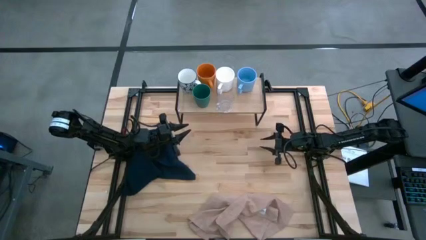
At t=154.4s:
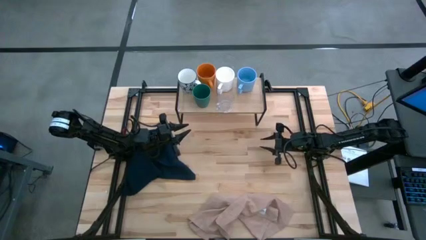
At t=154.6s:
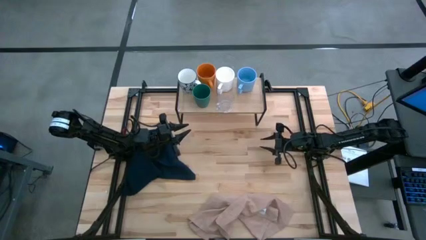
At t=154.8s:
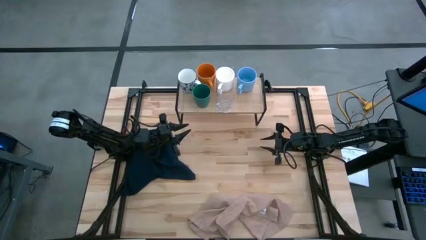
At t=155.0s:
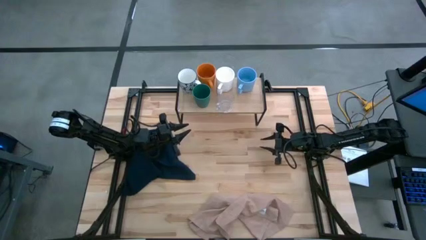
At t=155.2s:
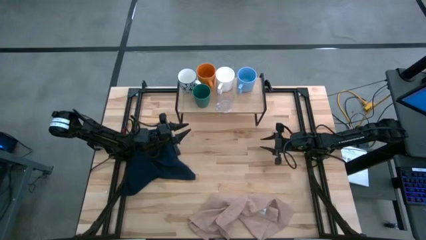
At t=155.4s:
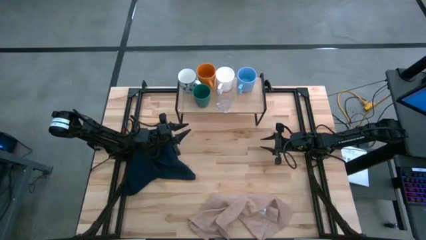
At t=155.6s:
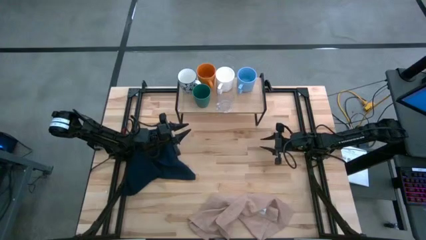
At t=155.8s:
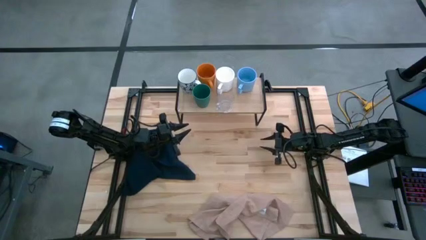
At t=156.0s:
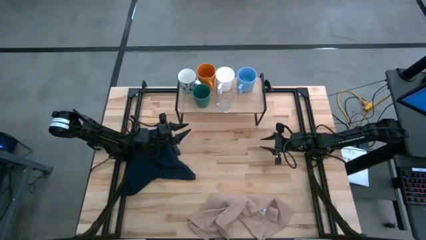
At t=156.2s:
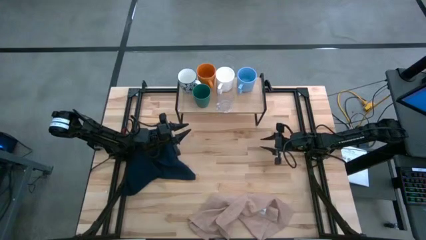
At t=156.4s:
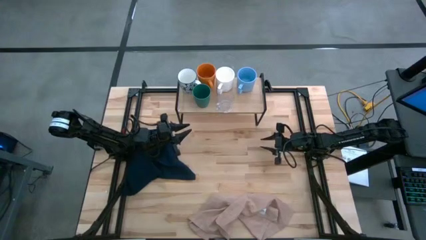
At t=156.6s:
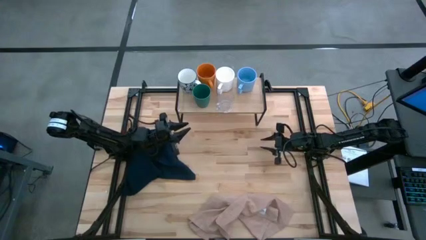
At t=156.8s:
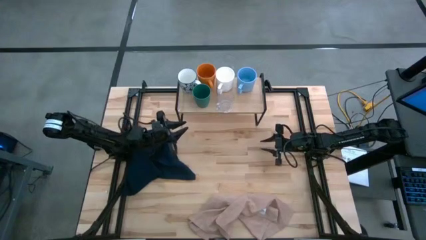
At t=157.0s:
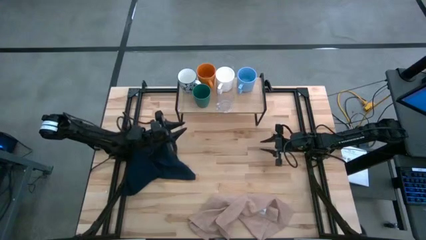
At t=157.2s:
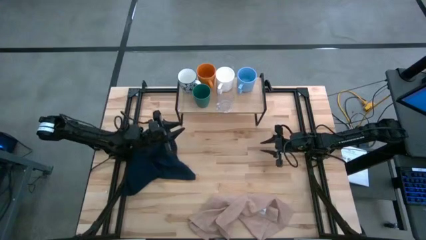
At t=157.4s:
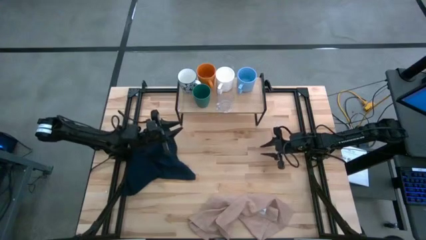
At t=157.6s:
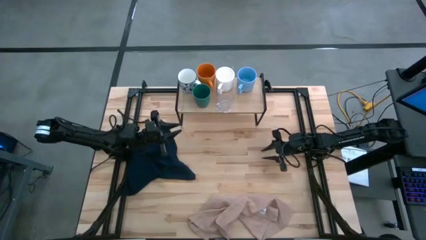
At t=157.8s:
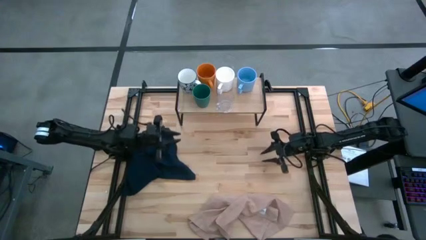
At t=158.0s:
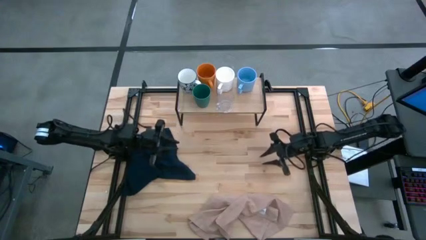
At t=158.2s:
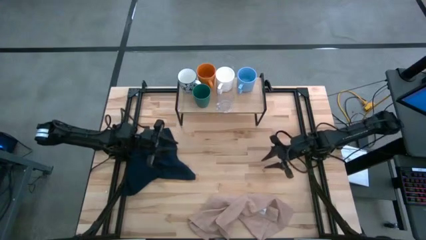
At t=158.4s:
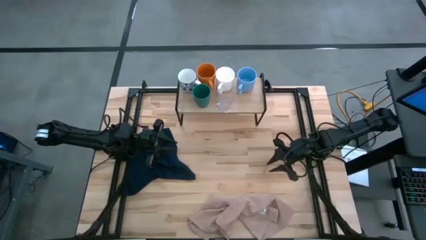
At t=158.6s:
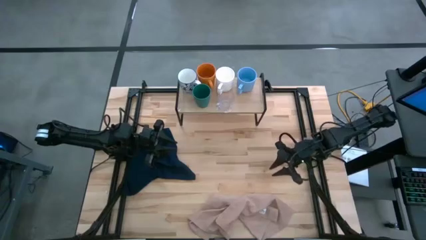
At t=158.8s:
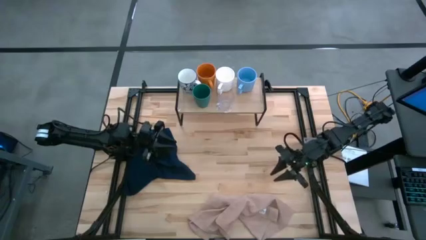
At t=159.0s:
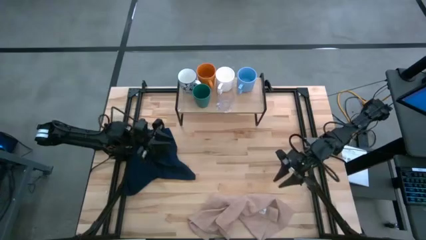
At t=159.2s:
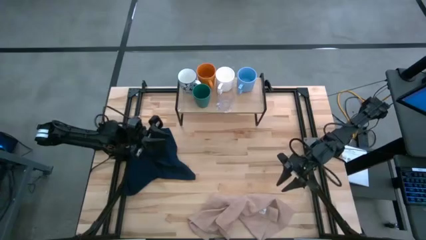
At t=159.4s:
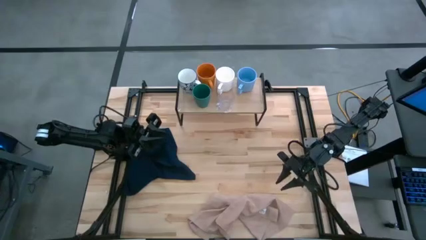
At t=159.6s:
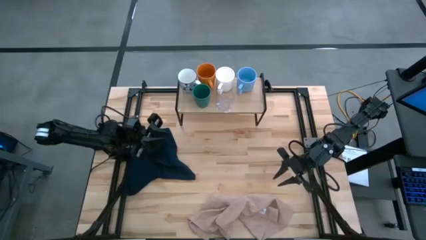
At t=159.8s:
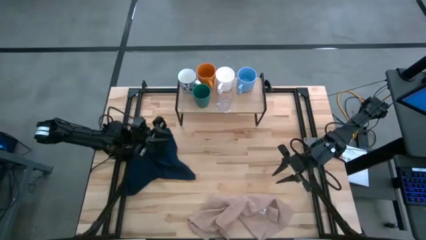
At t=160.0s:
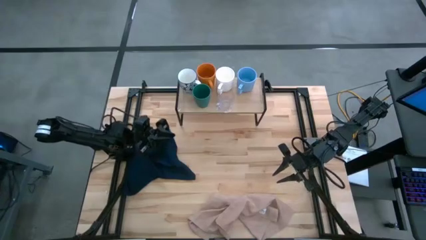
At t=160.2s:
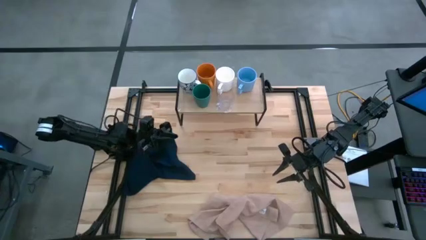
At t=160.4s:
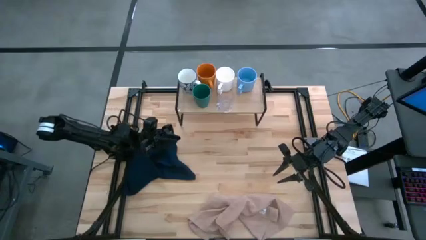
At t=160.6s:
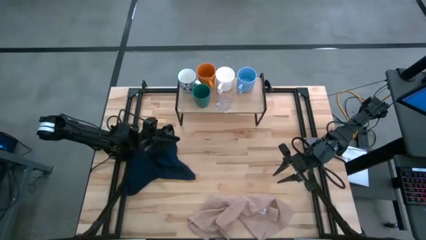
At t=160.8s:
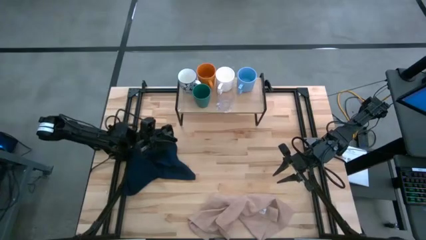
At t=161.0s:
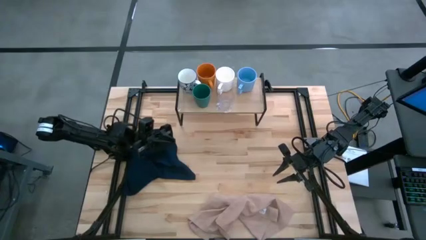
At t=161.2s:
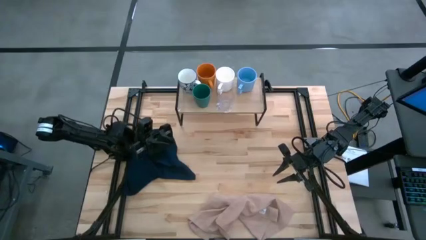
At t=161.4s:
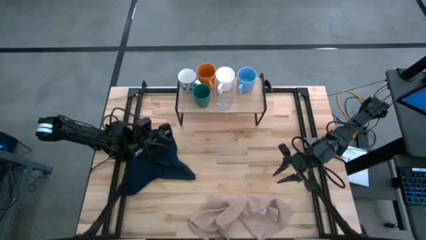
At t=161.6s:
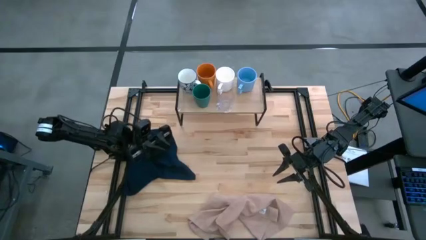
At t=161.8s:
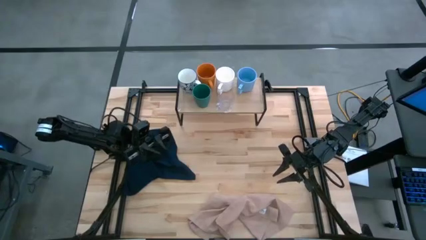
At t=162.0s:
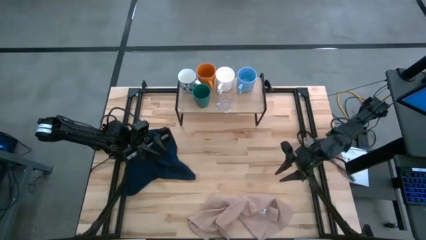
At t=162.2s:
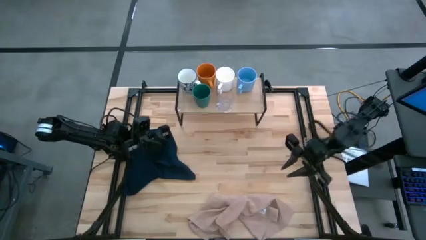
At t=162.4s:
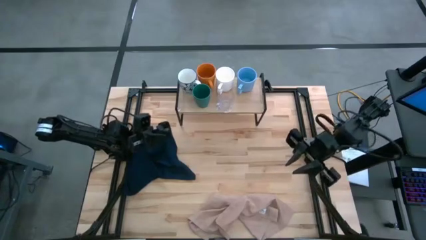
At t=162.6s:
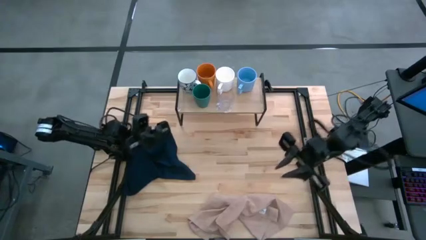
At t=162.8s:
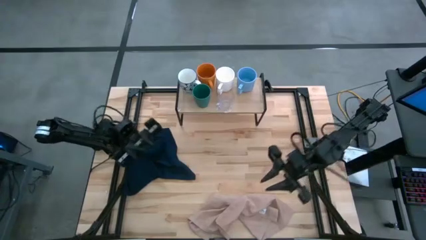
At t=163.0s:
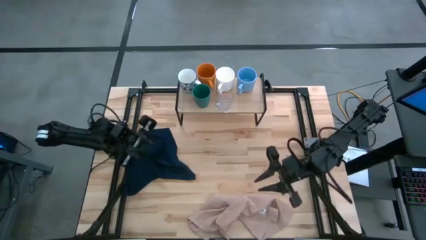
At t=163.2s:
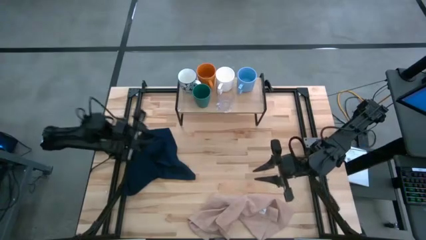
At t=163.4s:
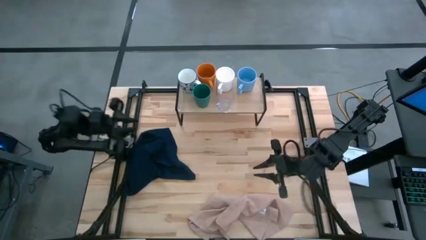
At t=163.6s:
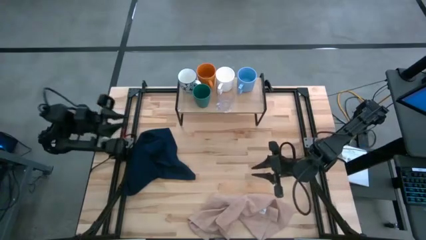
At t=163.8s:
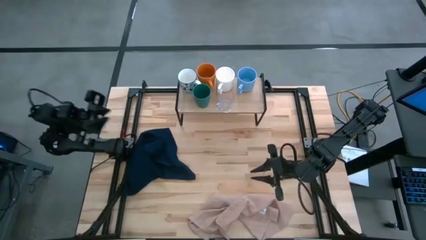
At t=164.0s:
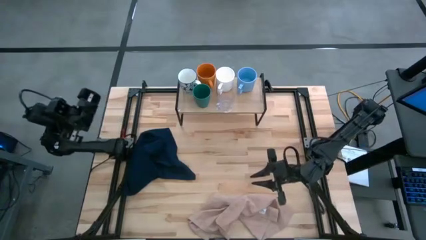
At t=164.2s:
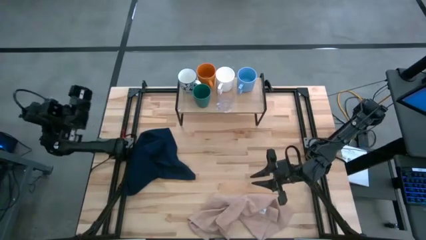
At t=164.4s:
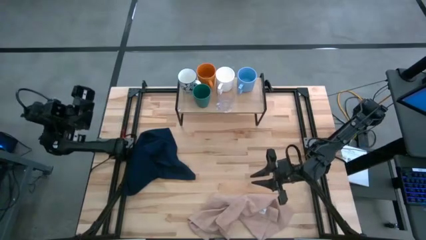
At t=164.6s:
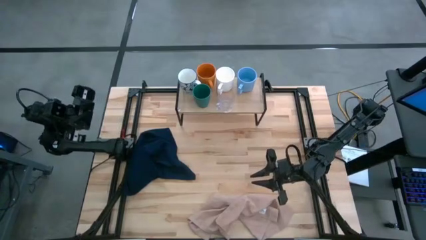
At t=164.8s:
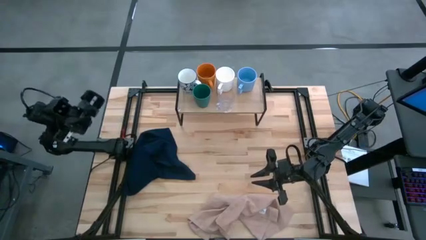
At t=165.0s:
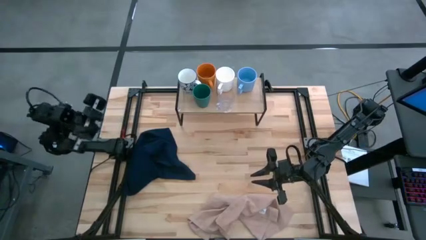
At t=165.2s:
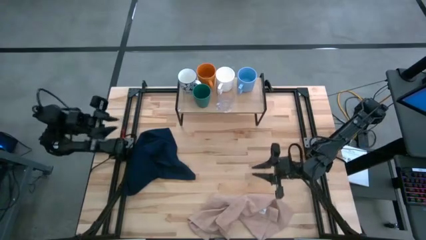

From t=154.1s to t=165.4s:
Task: Stack small to large cups/mugs on shelf
Return to Home Position

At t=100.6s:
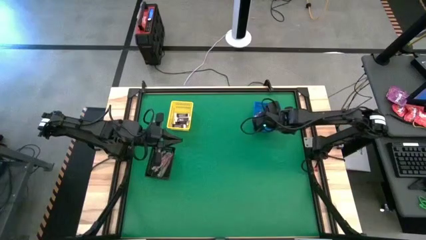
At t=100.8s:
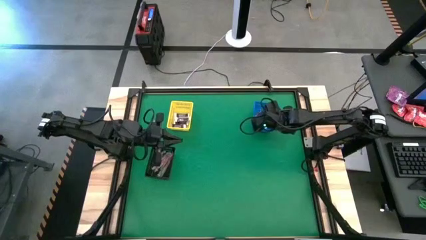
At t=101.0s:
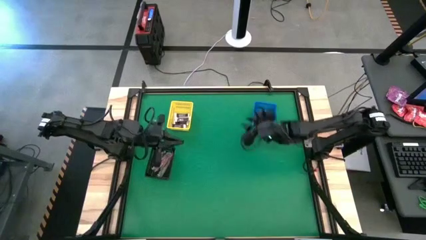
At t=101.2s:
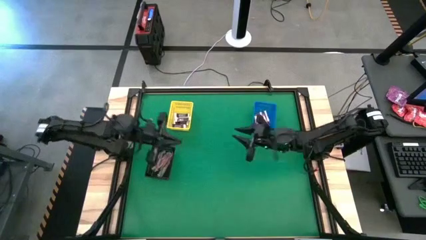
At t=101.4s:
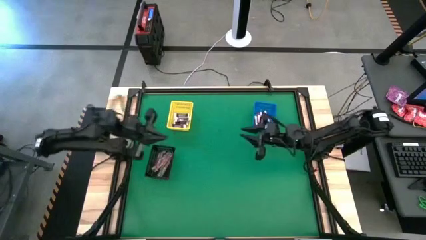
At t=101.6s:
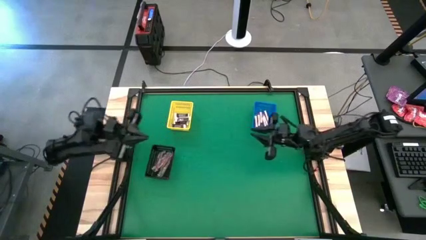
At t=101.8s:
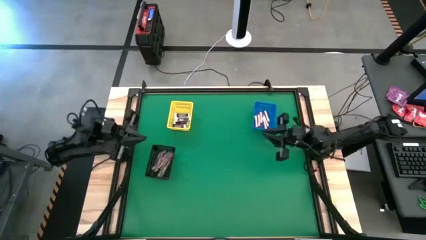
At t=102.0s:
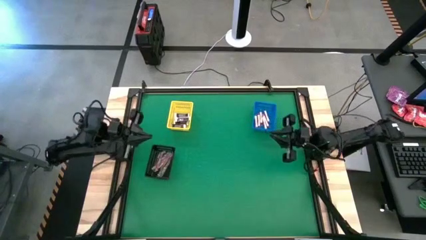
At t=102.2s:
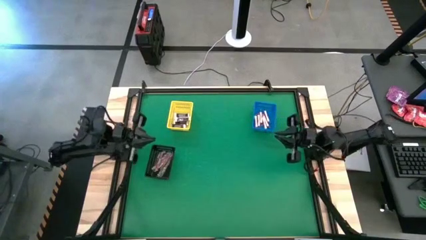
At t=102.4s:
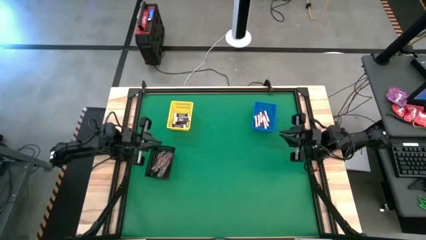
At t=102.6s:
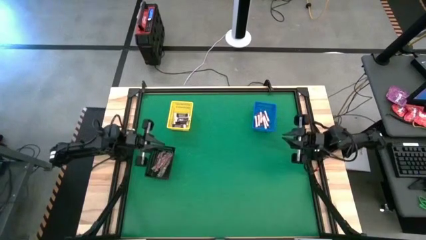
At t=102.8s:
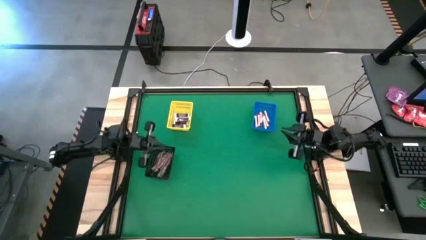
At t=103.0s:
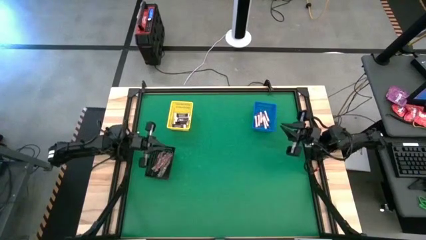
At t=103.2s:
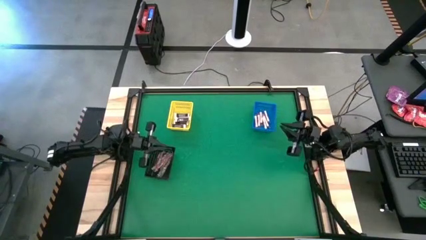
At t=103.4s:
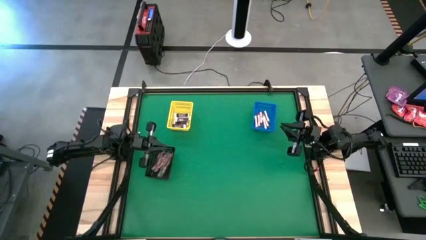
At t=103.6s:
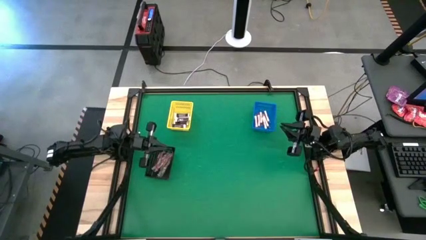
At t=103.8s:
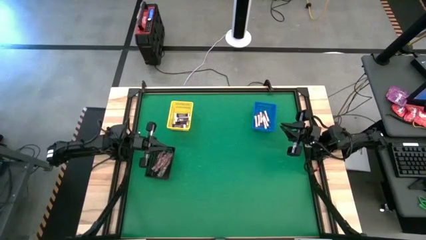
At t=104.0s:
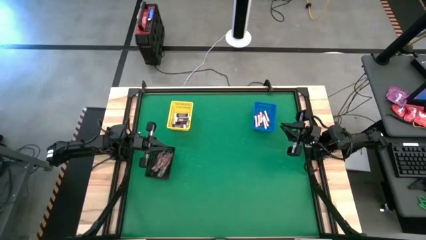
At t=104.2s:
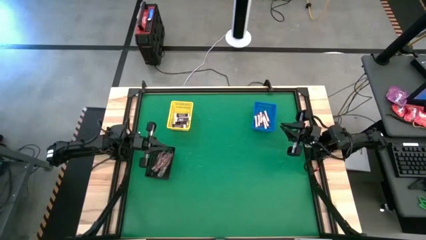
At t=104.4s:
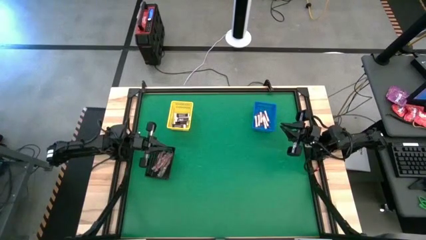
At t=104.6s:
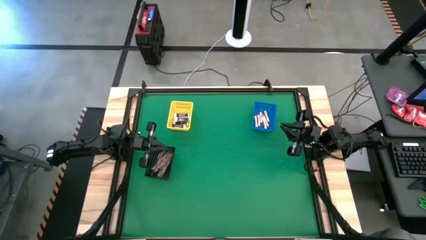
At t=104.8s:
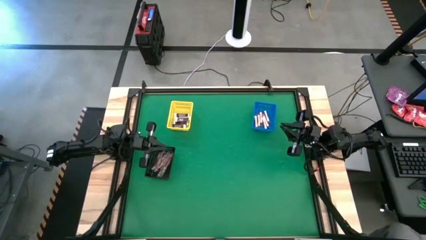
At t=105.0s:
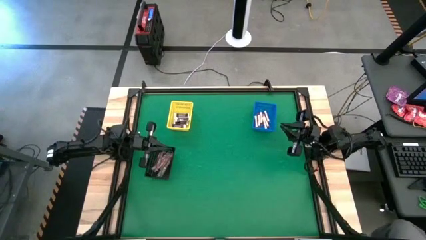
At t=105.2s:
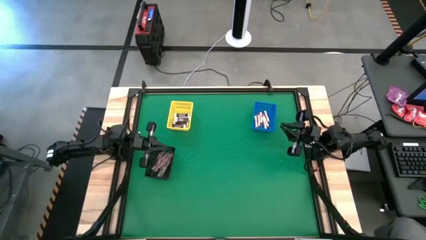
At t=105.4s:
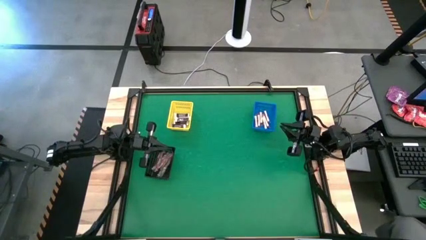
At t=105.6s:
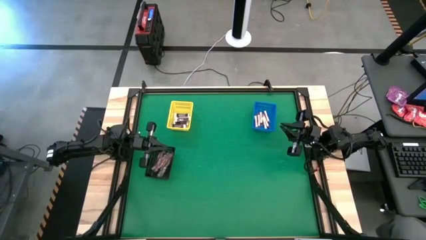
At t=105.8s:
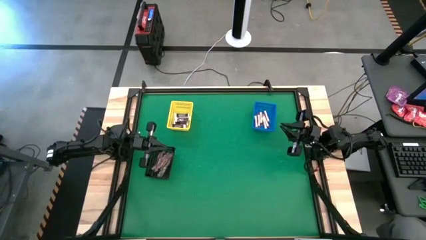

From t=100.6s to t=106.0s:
Task: Sort candy by brand, put in halloween buckets
Return to Home Position
